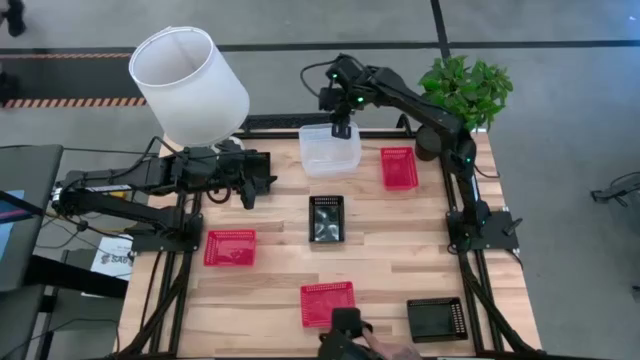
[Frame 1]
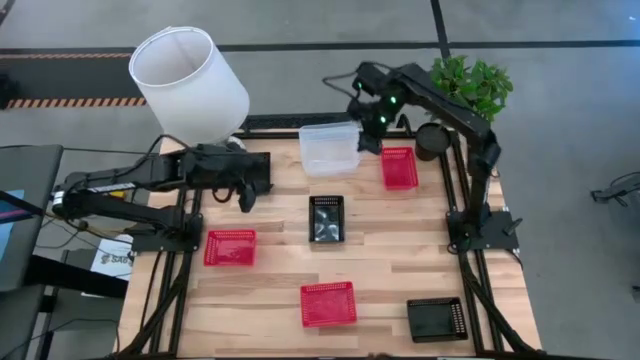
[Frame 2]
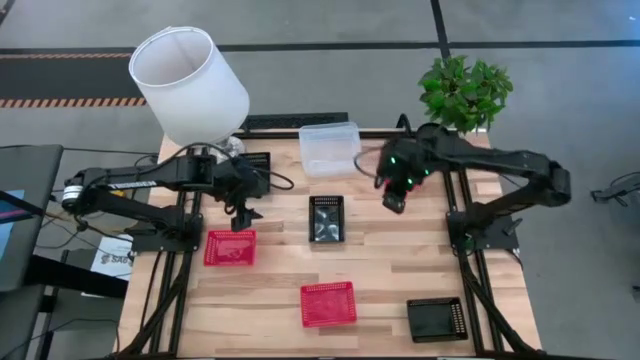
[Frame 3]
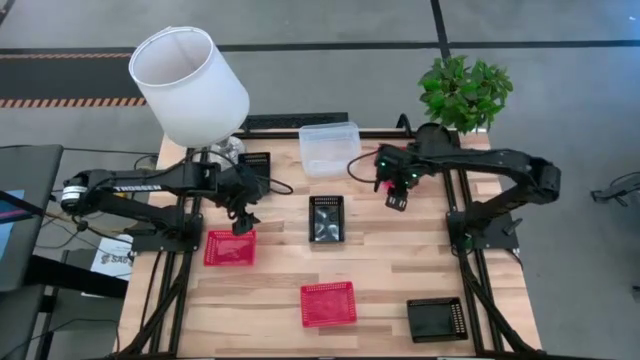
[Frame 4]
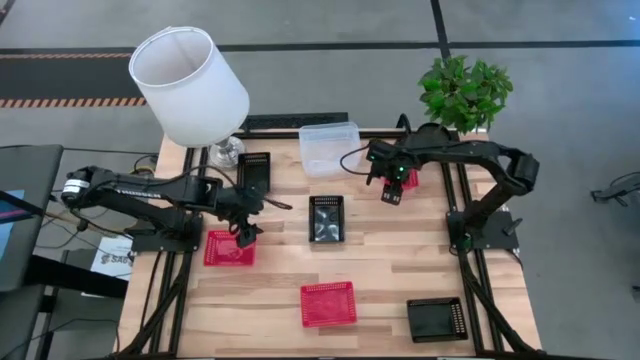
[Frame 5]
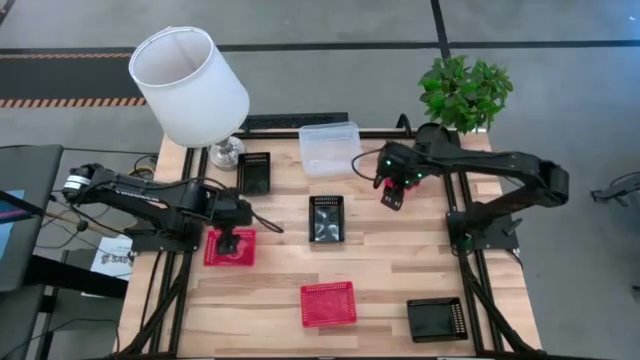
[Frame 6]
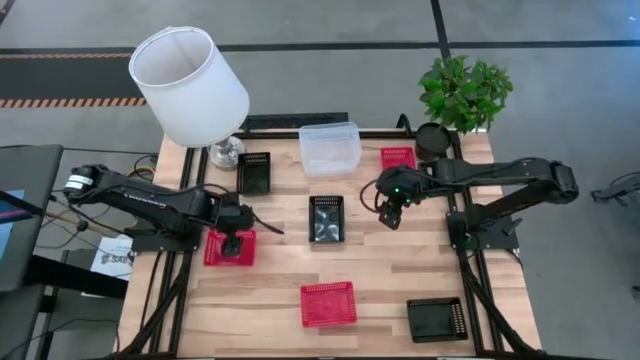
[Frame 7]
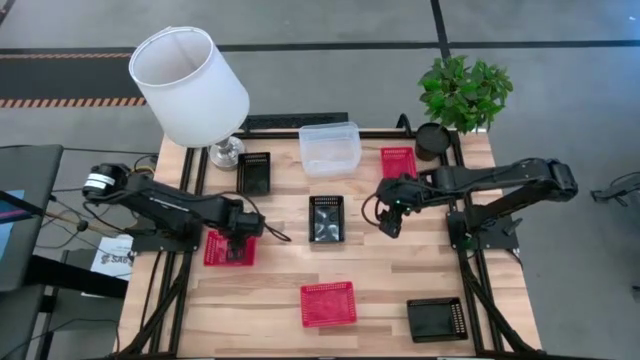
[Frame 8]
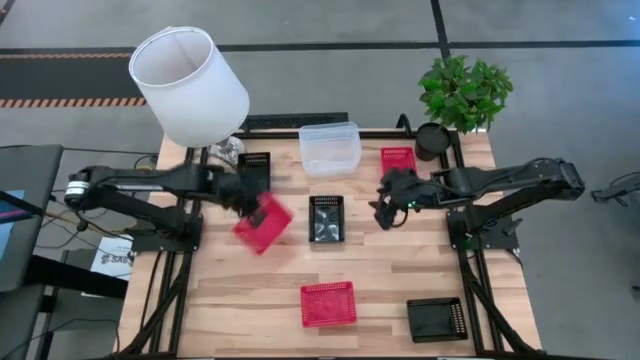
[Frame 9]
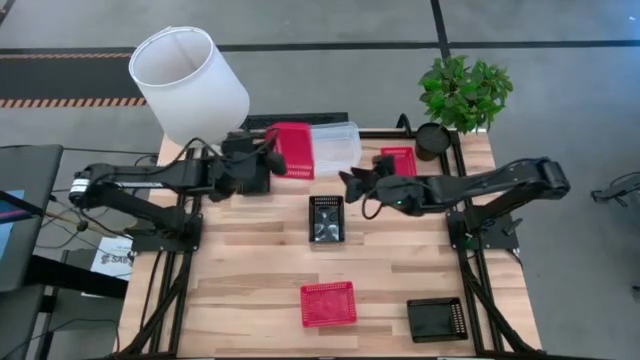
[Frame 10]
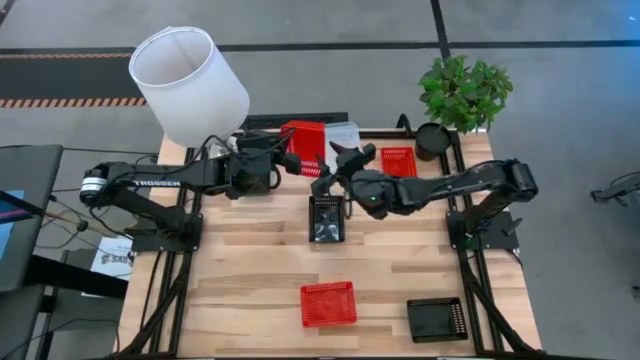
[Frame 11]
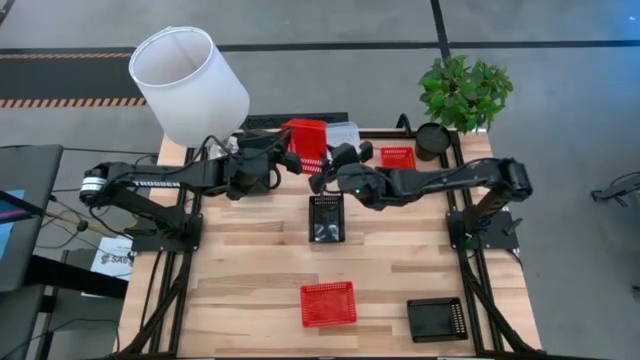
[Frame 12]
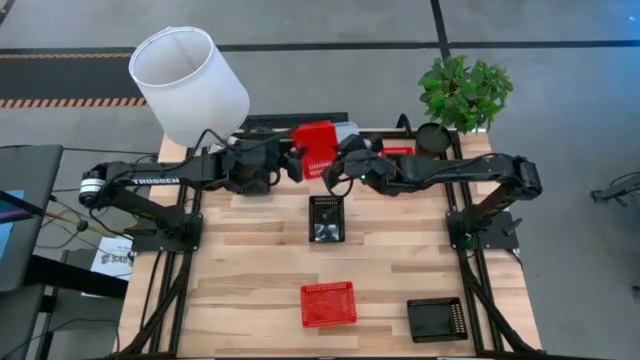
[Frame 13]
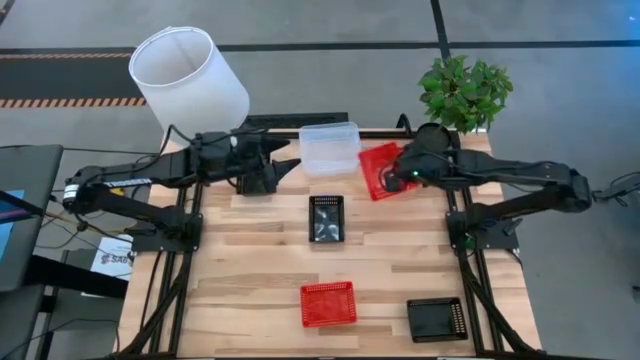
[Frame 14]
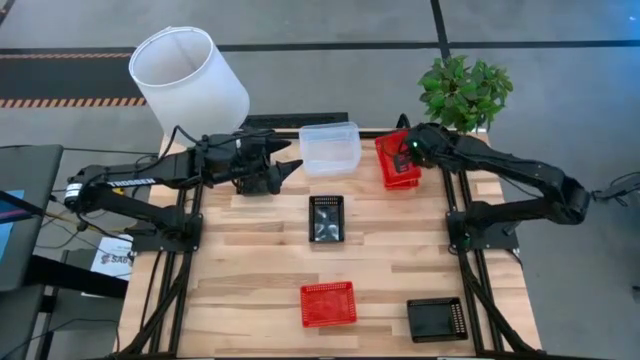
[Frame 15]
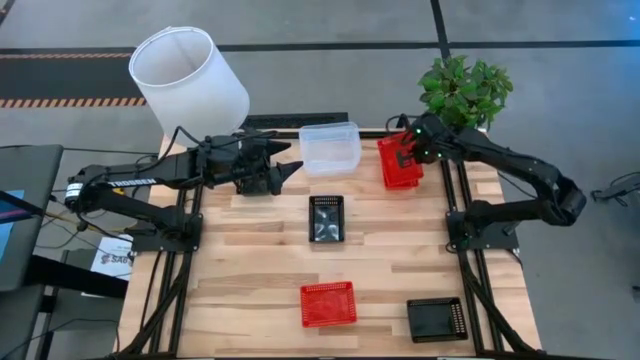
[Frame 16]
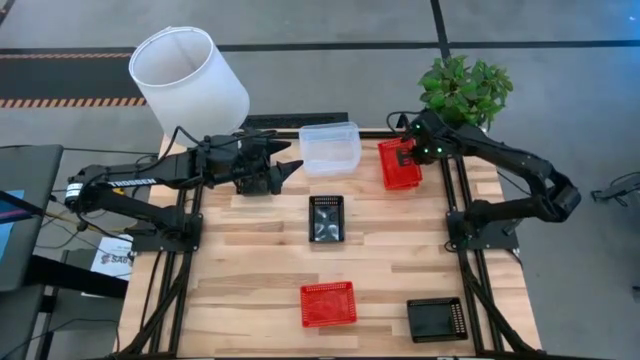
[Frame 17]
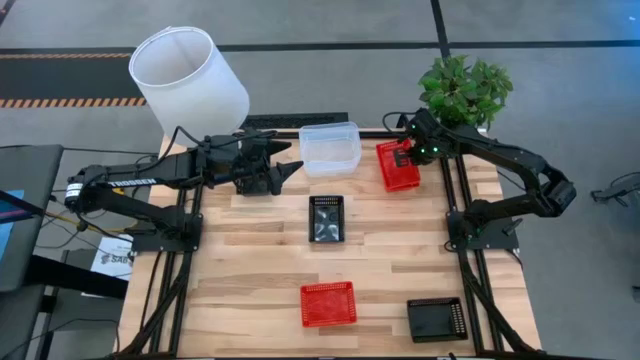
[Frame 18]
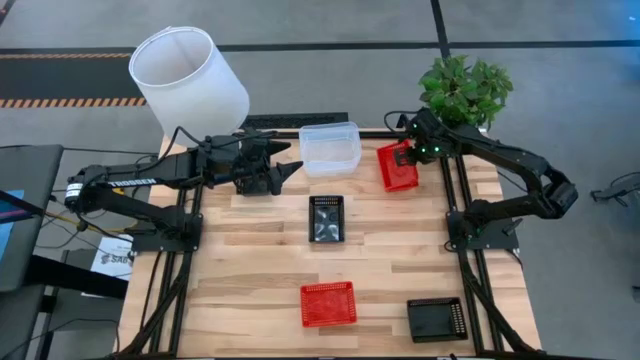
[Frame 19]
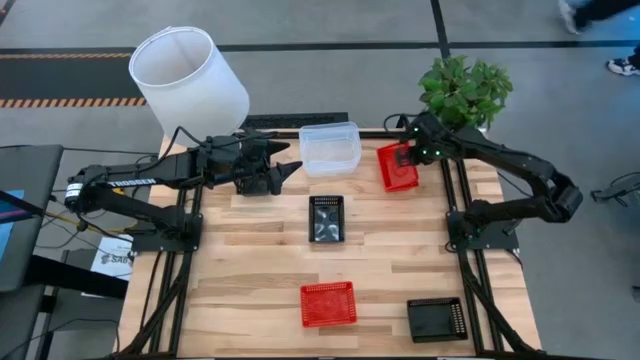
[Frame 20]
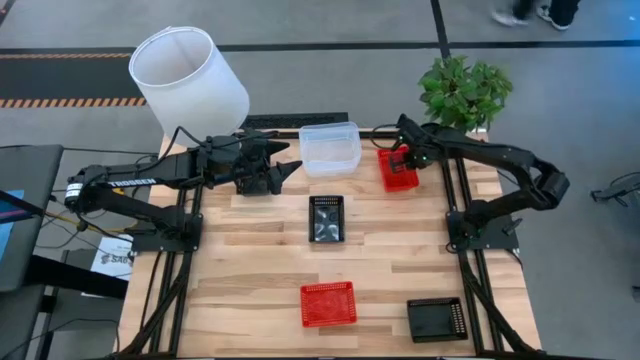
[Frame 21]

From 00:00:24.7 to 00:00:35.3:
Stack the middle red bin on the top red bin

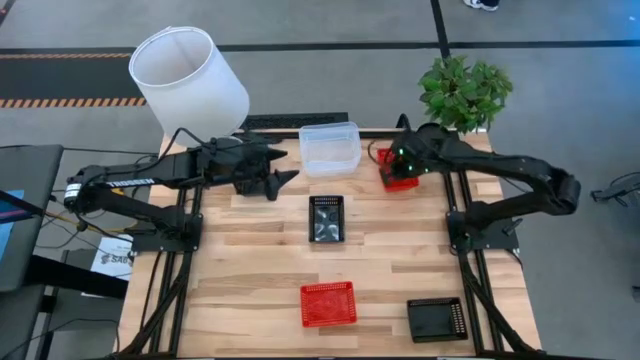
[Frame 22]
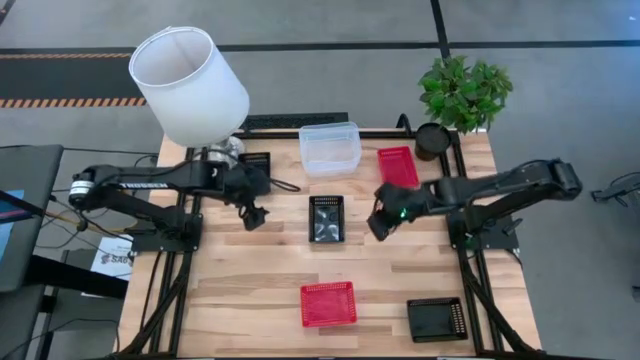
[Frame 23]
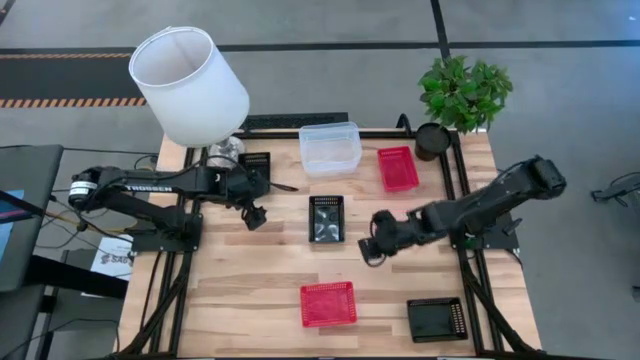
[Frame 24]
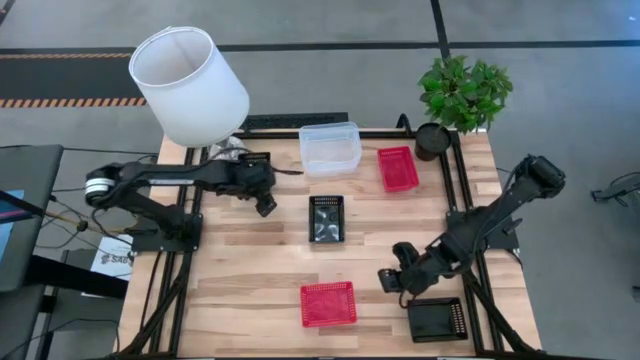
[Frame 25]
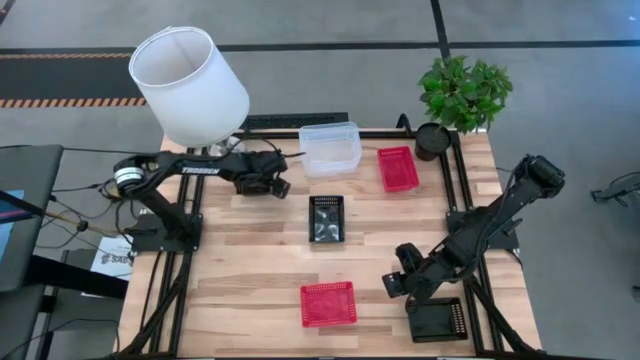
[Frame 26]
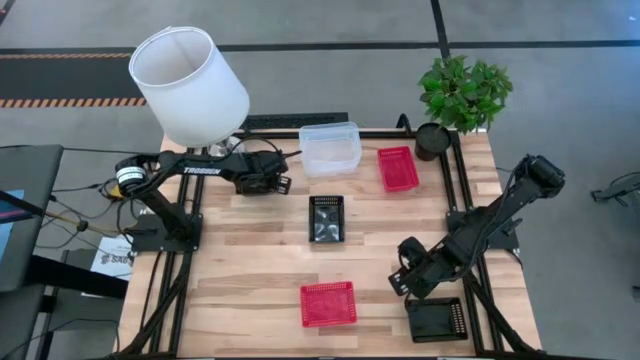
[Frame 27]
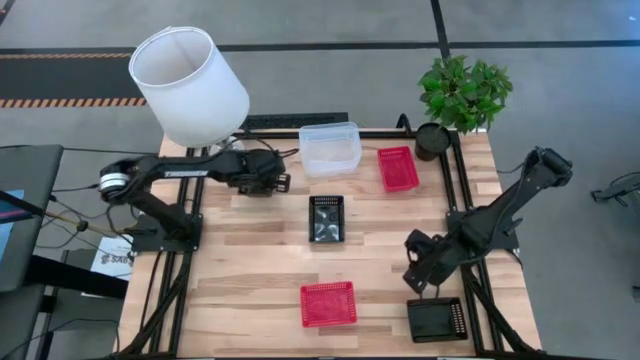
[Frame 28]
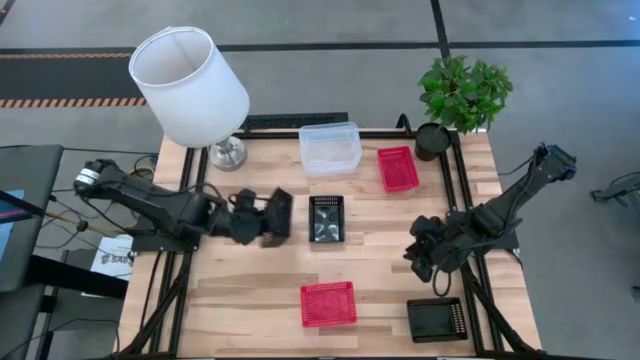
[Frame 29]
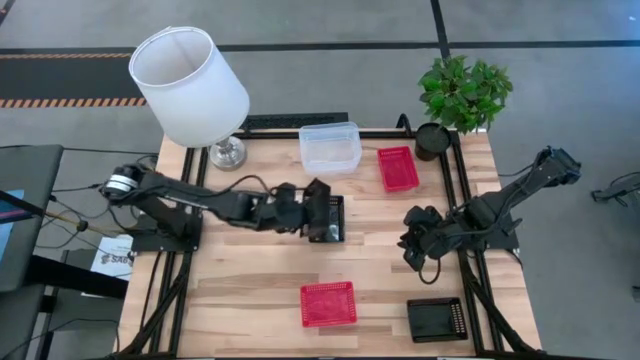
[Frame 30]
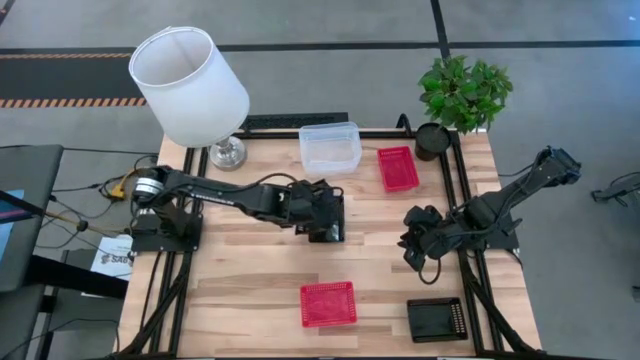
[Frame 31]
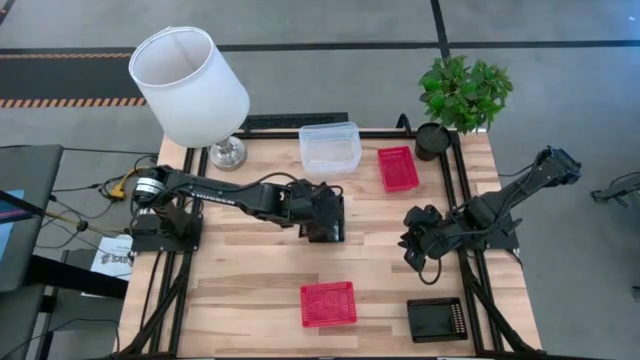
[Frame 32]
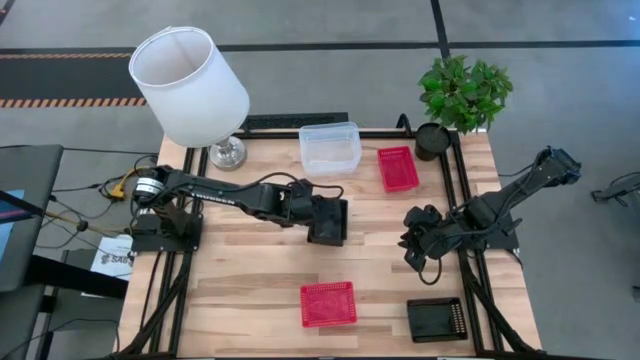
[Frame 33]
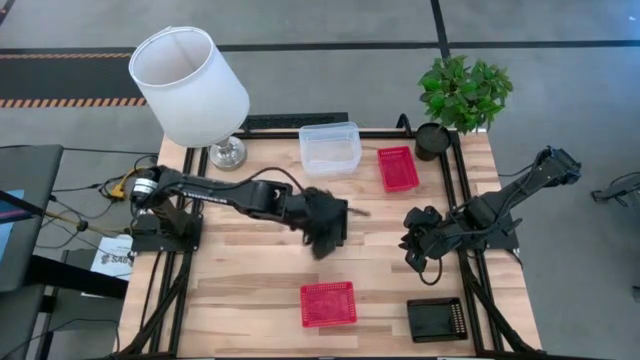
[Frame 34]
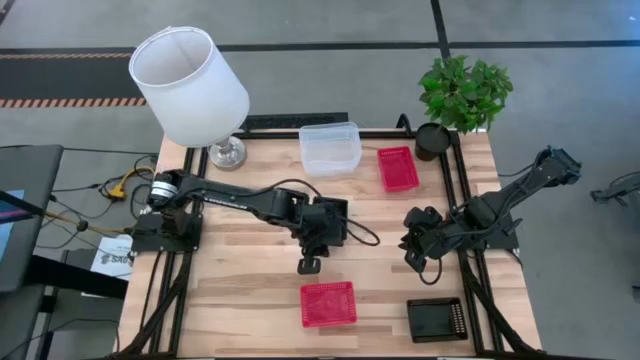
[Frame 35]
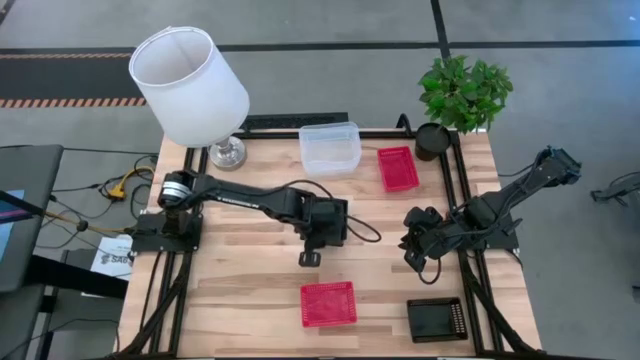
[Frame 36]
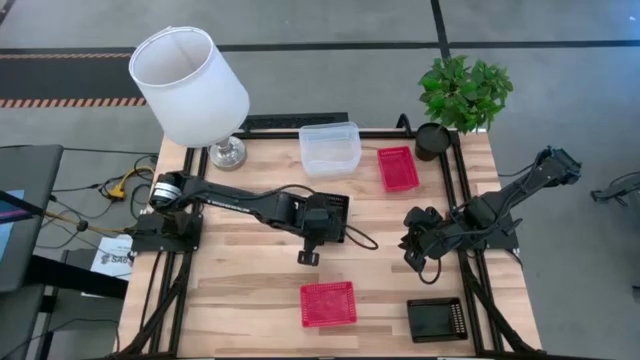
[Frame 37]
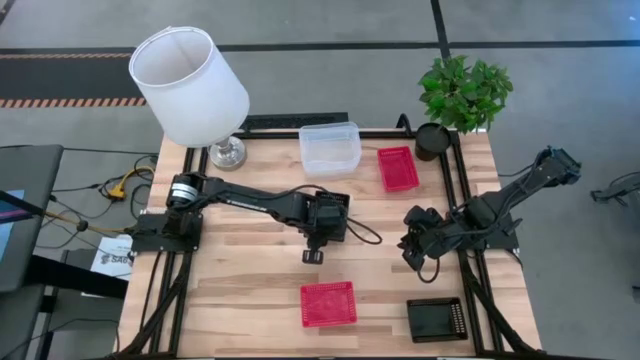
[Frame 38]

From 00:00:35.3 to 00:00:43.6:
Stack the top black bin on the middle black bin

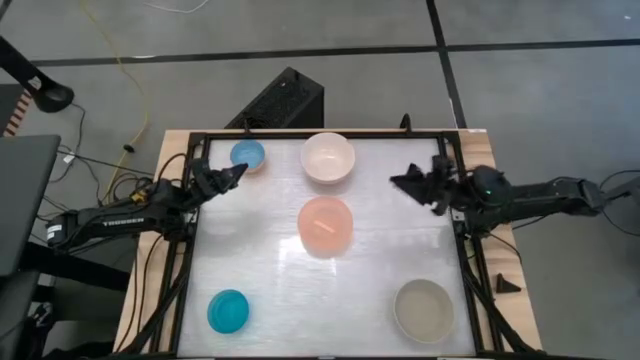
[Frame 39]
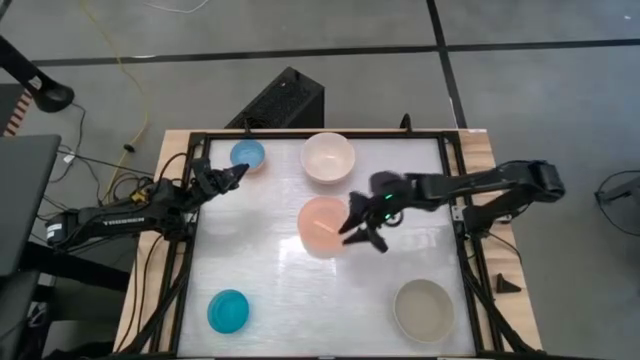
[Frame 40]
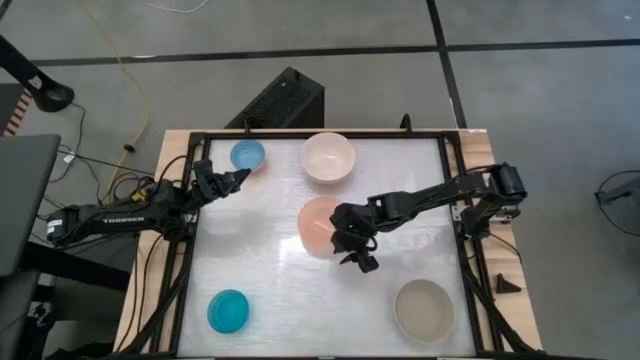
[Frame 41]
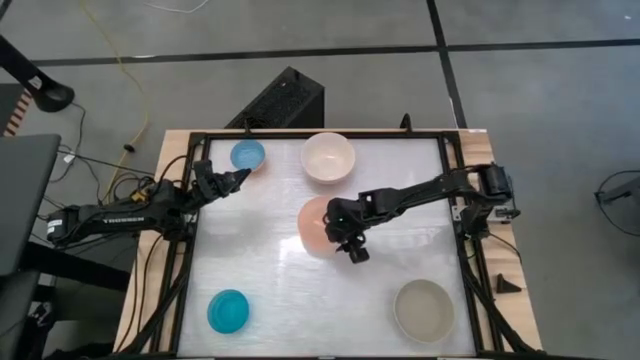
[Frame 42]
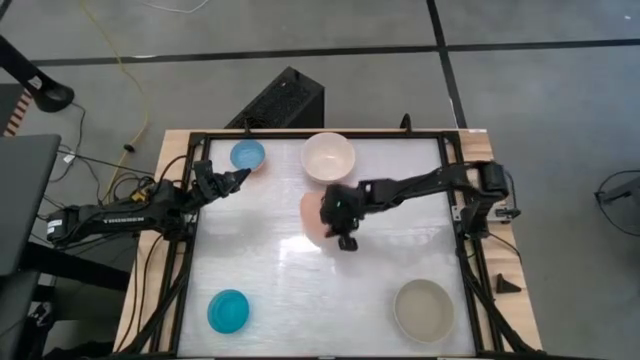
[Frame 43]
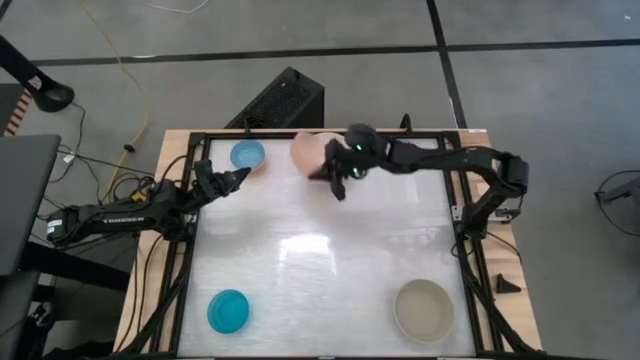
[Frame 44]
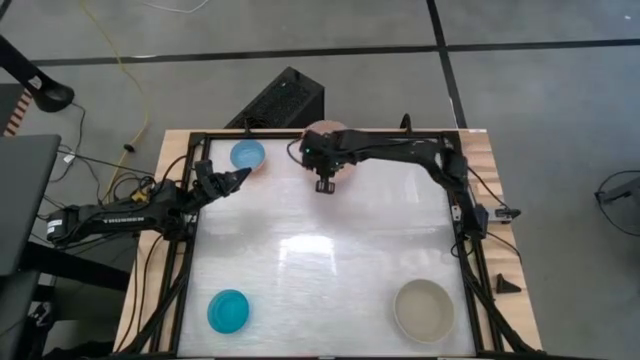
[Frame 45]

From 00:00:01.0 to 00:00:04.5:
Stack the pale orange bowl into the white bowl
